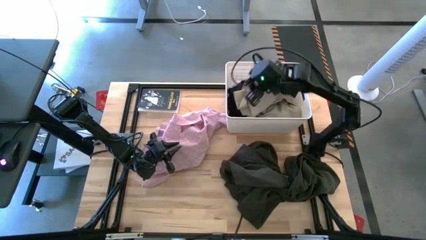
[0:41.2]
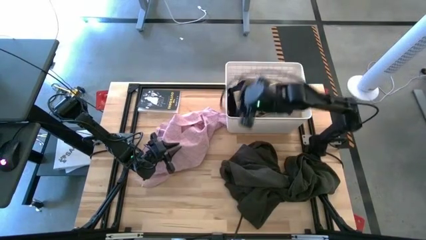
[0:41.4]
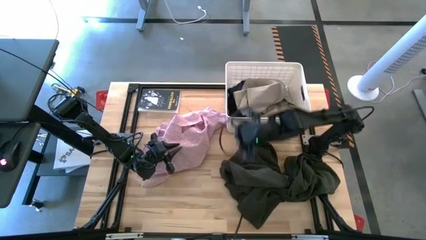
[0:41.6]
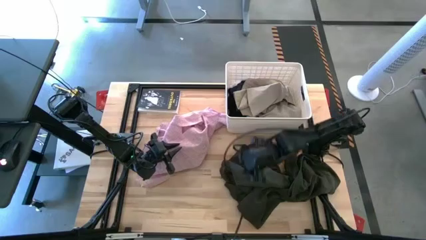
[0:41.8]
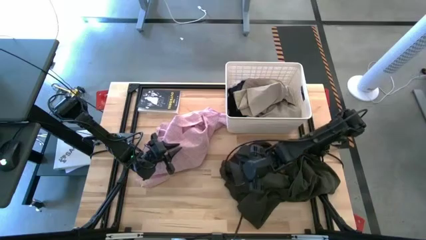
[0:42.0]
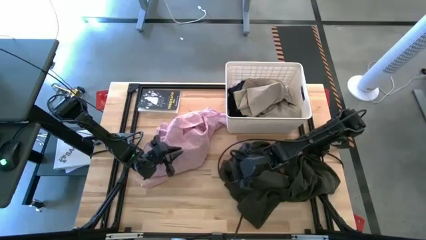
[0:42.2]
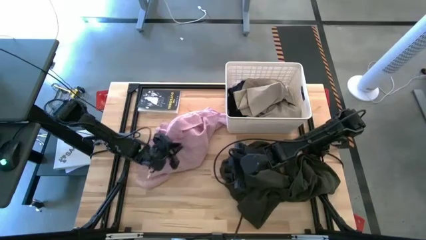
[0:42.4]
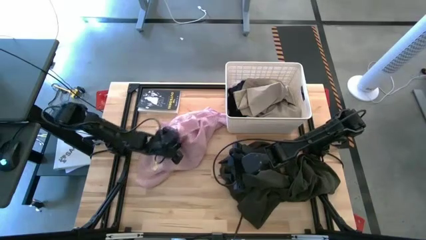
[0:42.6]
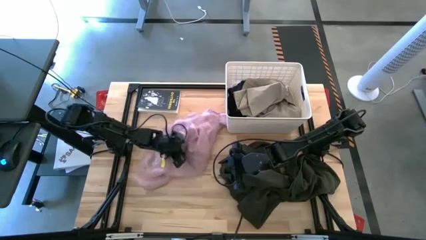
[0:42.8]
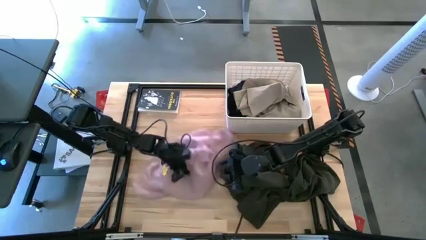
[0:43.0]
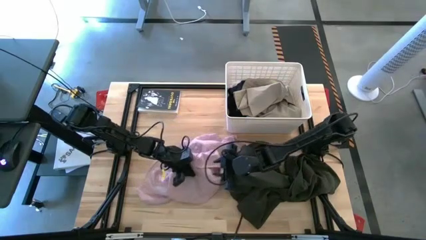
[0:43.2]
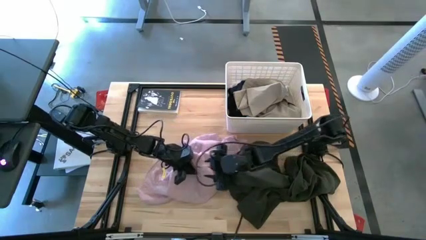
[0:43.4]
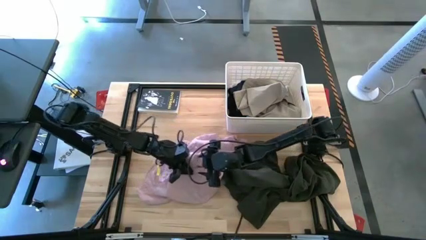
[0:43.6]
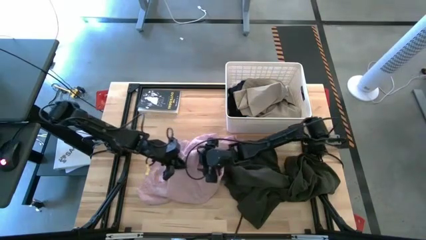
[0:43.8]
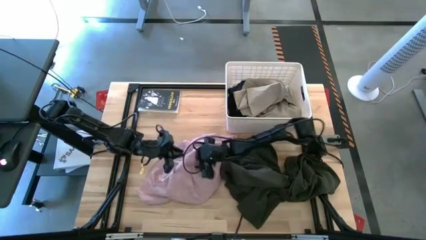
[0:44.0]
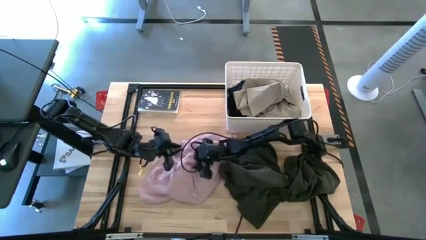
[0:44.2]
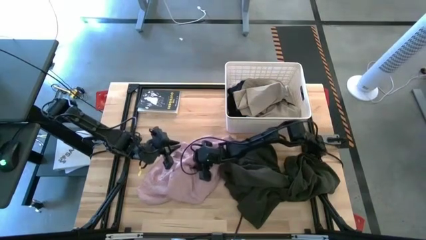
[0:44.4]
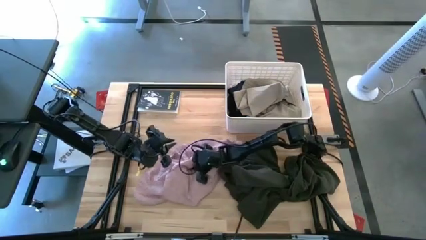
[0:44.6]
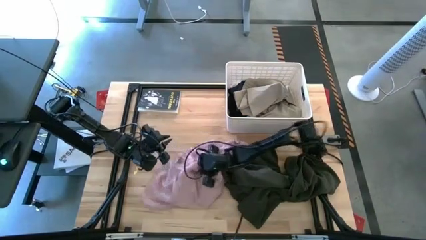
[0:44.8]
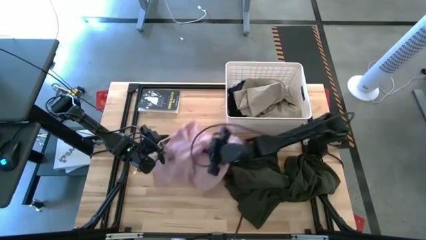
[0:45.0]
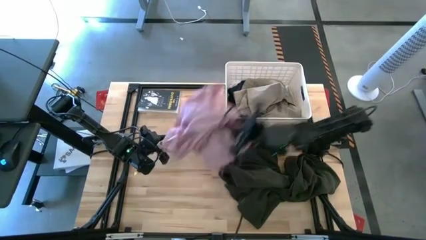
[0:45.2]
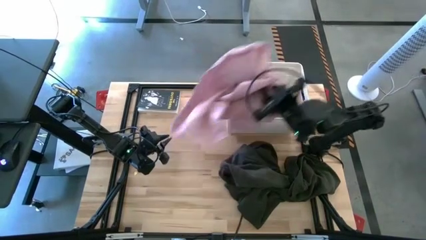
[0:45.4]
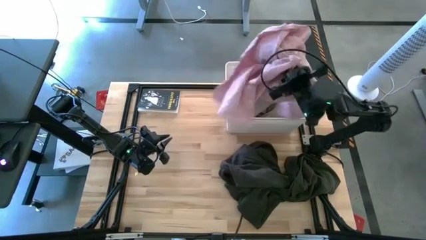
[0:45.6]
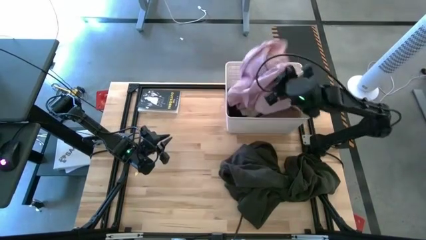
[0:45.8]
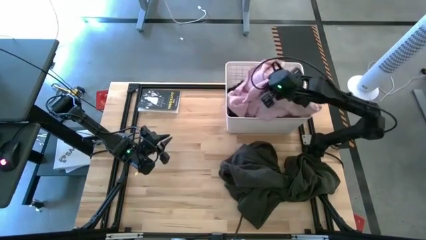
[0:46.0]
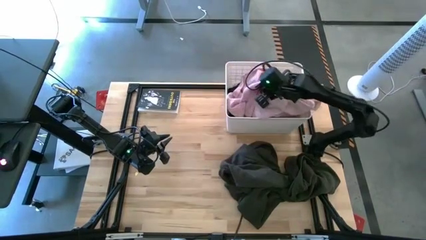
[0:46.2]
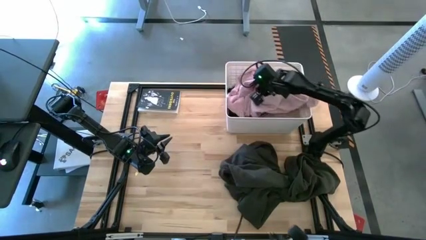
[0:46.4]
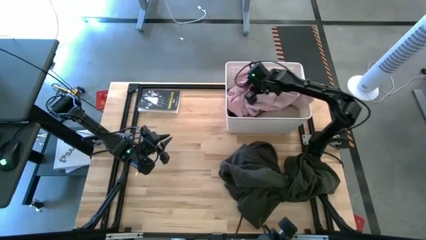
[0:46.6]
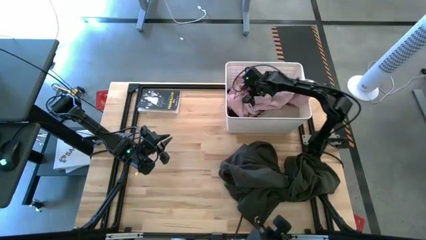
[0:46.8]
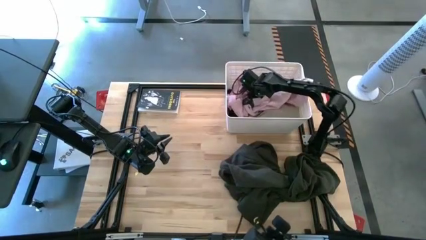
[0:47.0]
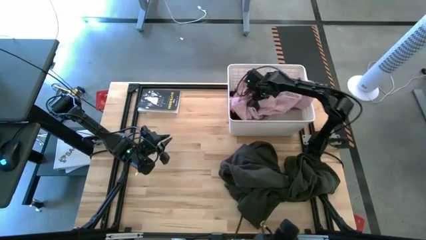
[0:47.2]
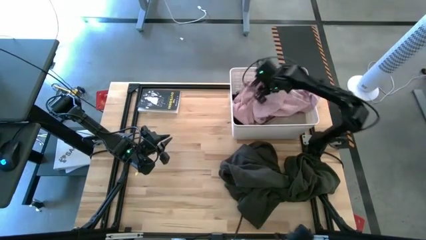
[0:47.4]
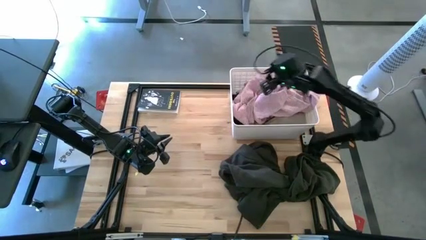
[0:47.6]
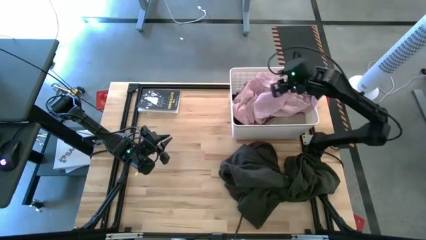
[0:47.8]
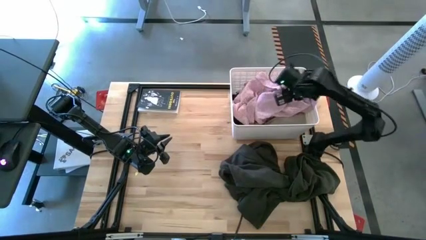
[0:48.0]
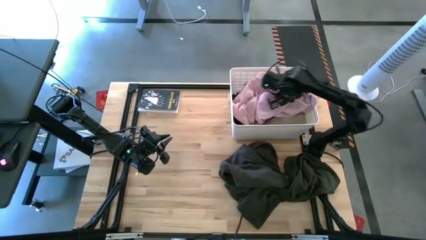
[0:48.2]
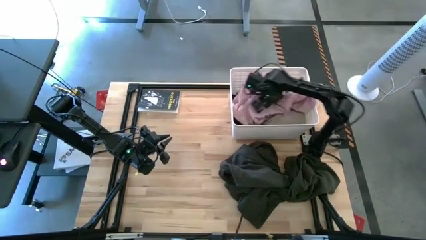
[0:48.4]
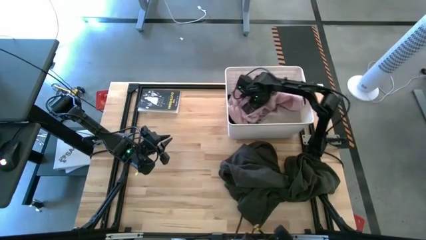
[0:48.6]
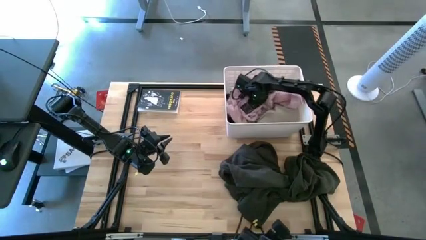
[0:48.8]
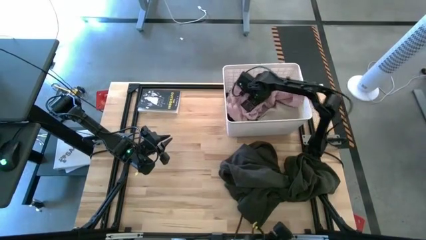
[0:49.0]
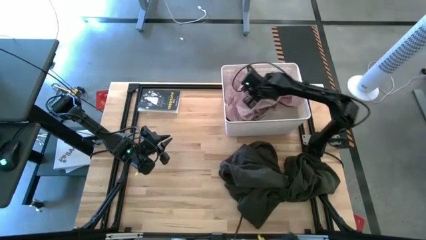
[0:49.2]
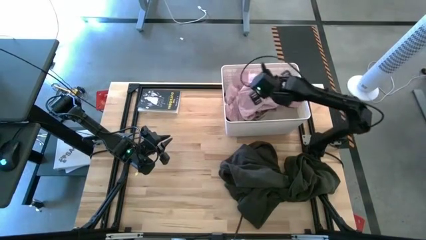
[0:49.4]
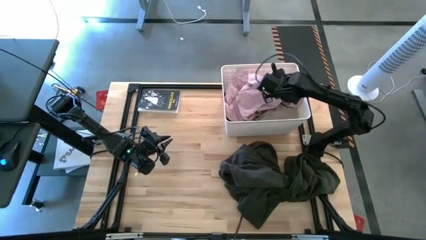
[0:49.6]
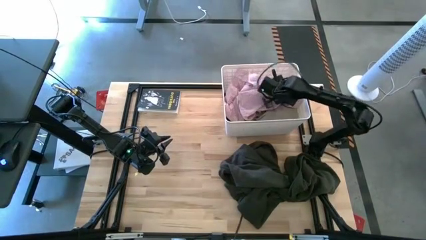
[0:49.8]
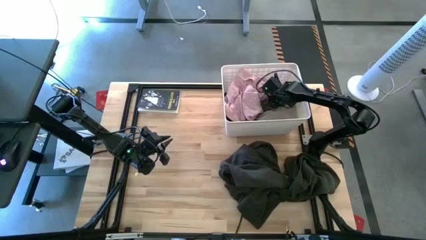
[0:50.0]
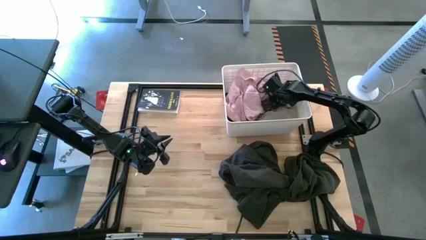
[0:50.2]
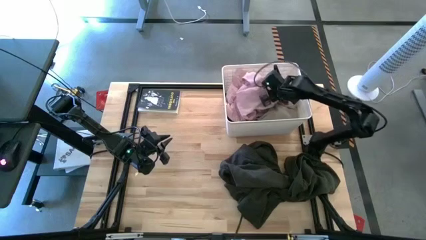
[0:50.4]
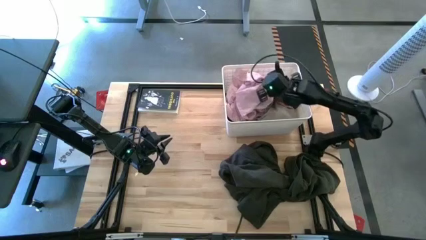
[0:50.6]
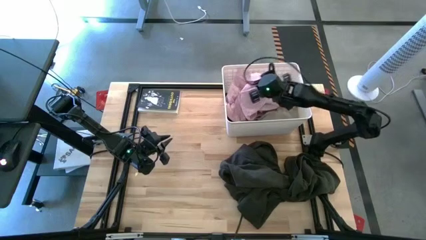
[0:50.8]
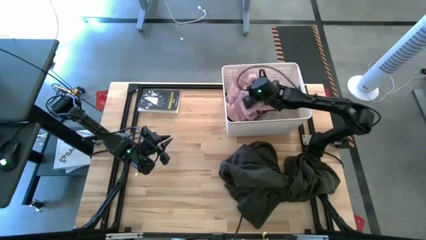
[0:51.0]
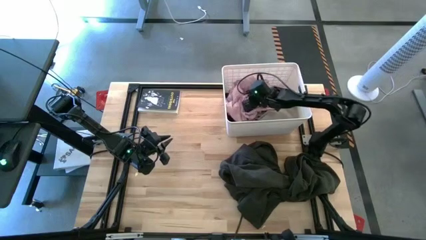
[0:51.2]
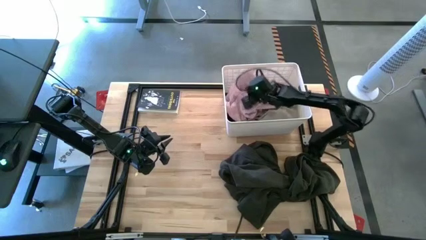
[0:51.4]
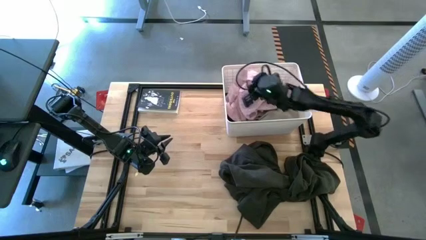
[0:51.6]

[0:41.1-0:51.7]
Task: Sort clothes
Put the pink shirt into the laundry bin

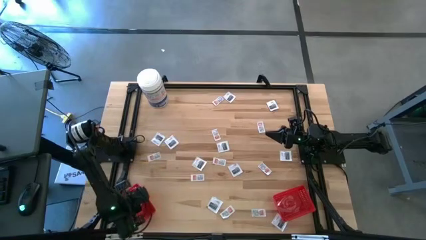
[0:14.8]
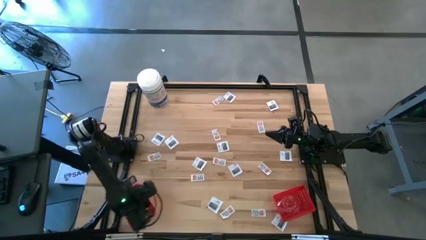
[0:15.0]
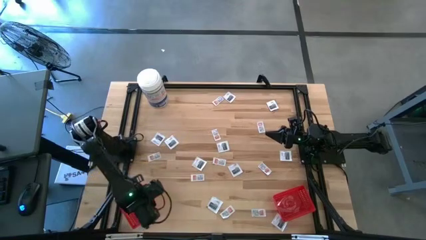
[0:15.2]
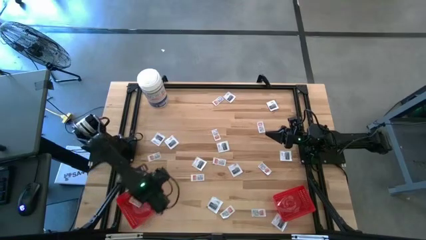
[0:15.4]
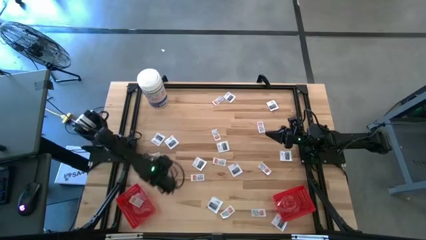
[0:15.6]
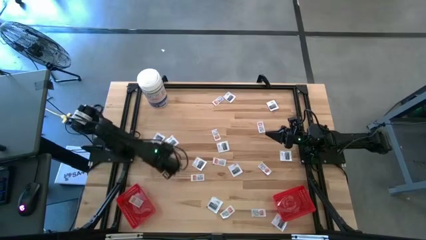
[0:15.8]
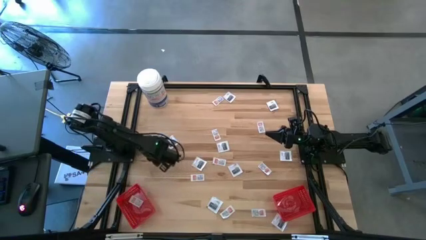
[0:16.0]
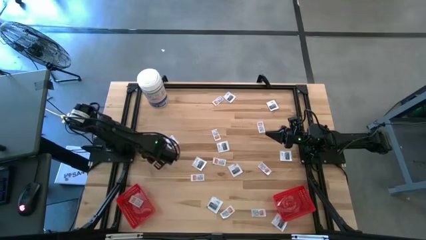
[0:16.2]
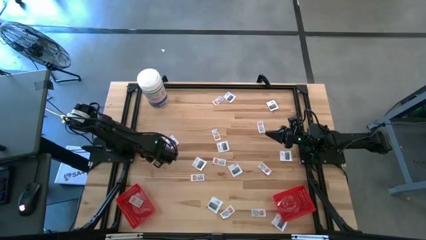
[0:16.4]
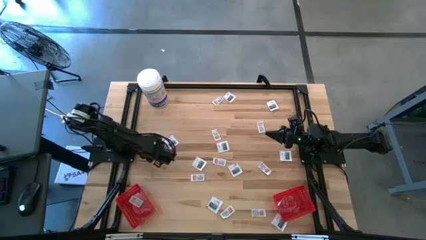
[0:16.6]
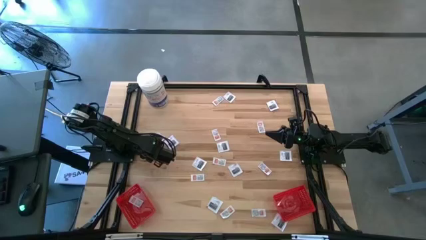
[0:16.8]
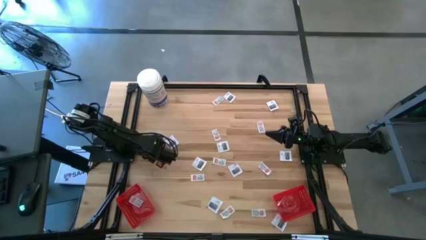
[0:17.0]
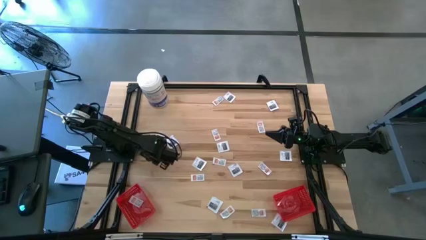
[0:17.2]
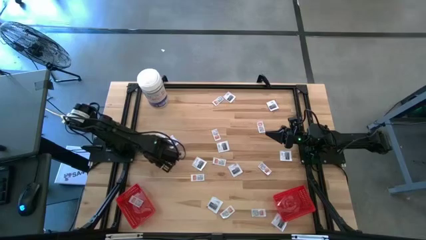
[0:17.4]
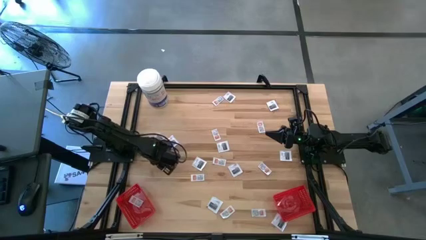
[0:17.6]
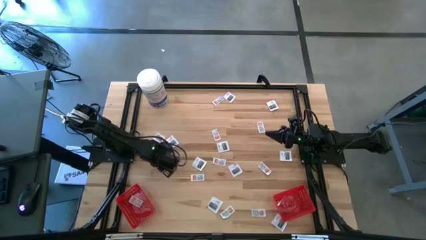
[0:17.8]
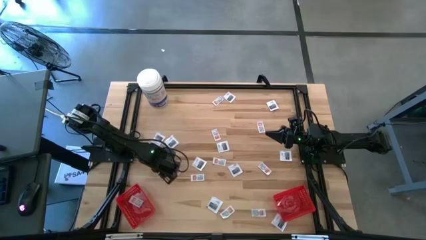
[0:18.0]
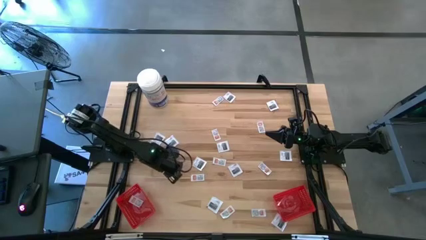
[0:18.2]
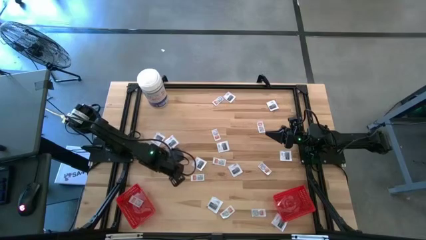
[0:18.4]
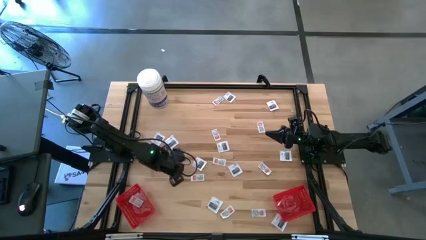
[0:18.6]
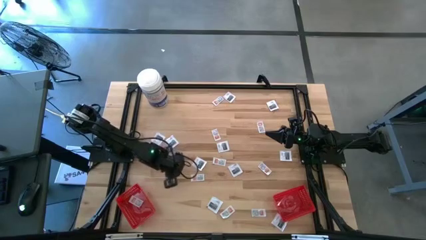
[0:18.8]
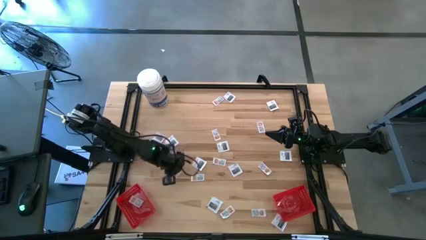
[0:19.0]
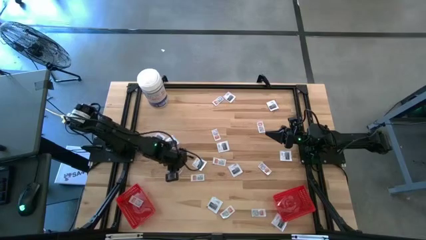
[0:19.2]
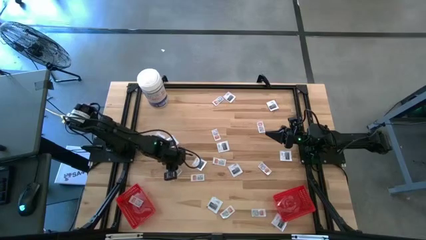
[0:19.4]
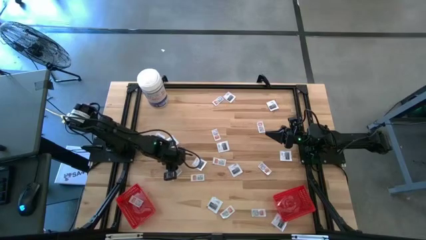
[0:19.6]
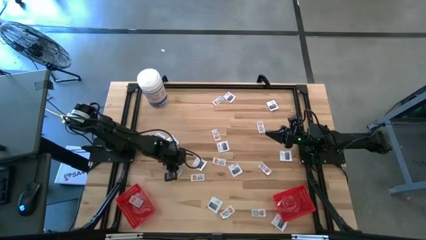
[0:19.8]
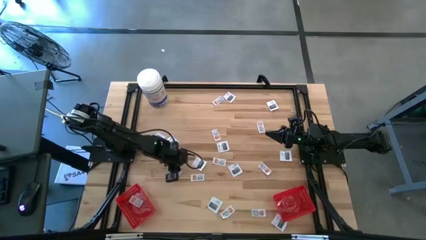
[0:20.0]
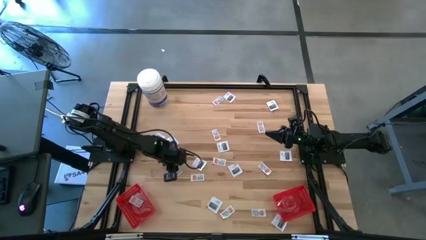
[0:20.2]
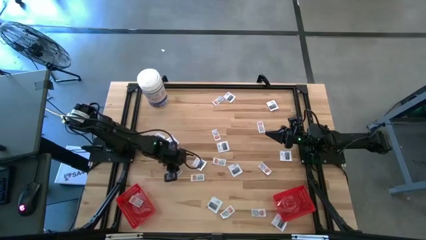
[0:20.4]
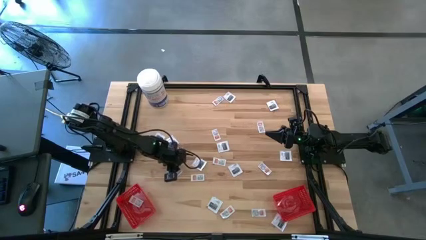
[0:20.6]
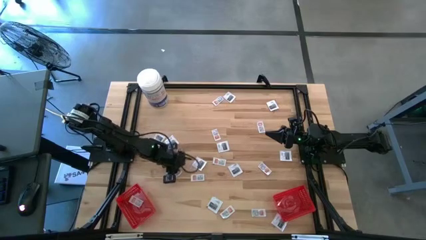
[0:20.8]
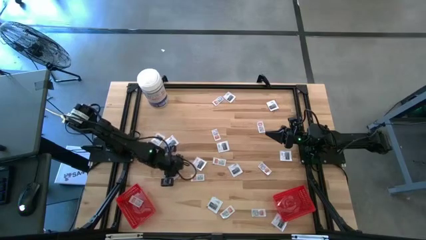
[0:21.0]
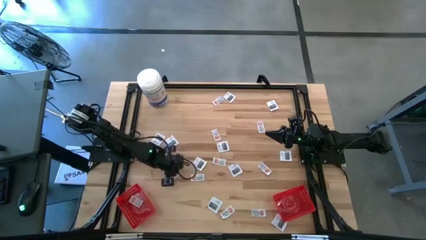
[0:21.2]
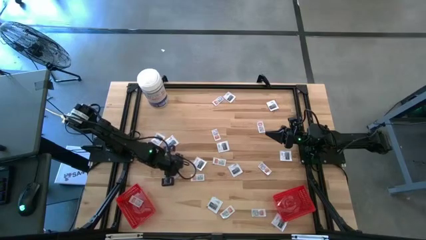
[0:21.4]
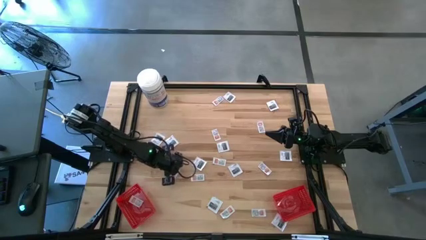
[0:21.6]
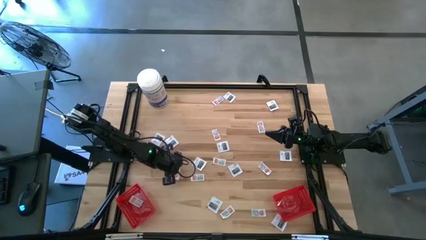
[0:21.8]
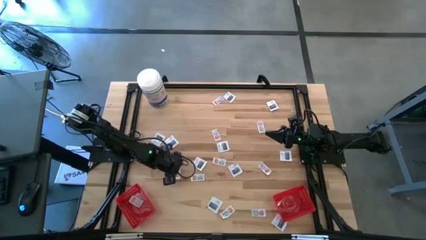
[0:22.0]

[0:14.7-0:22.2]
Task: Pick & Place First Aid Supplies
Put the ointment pack into the left red bin
